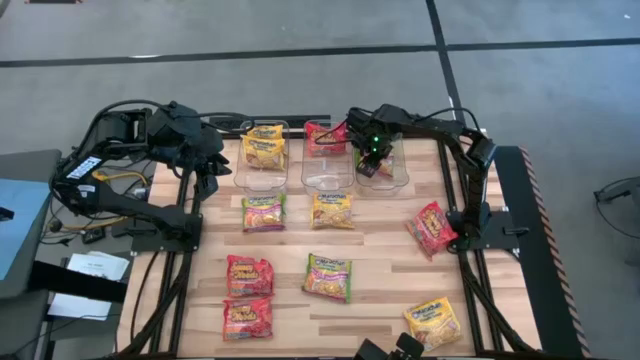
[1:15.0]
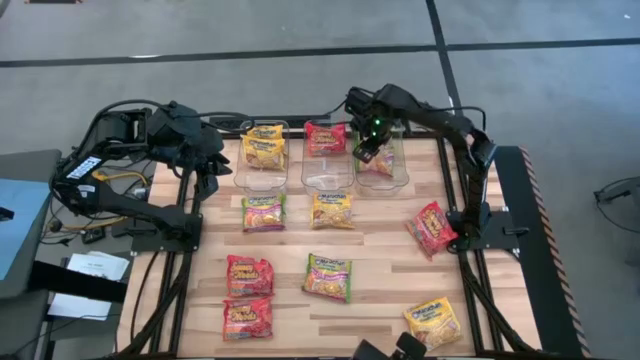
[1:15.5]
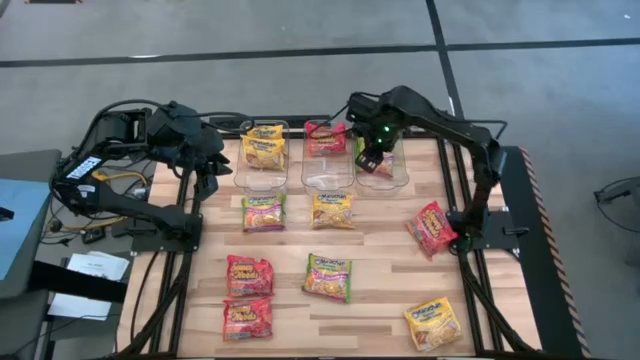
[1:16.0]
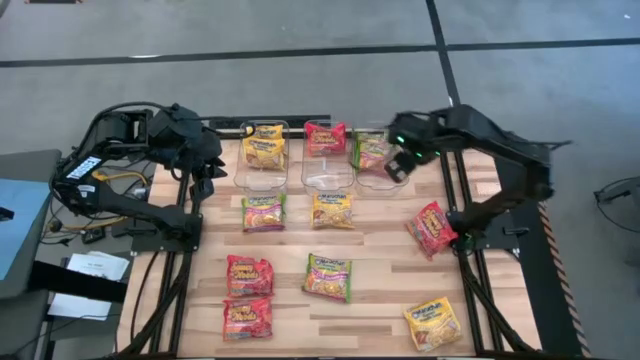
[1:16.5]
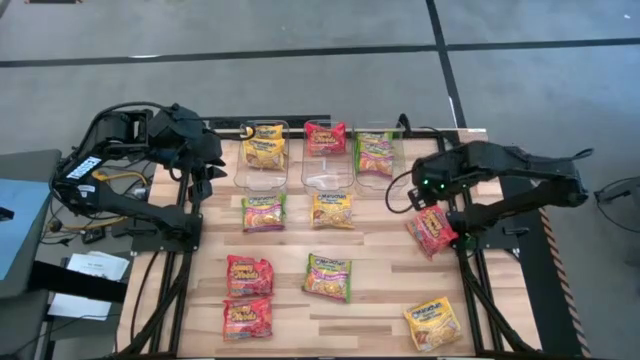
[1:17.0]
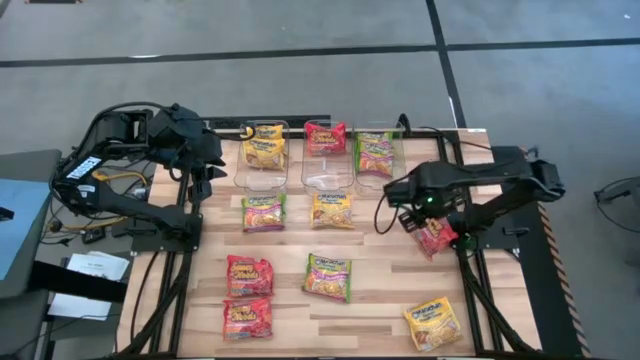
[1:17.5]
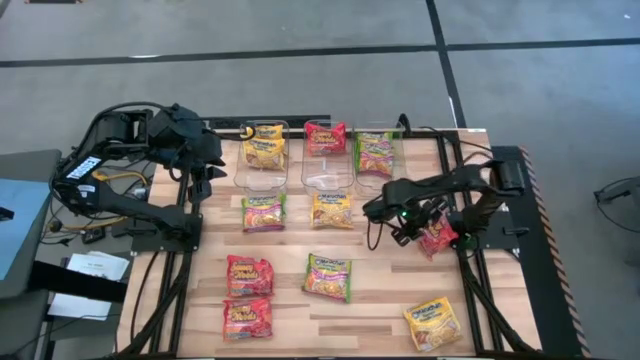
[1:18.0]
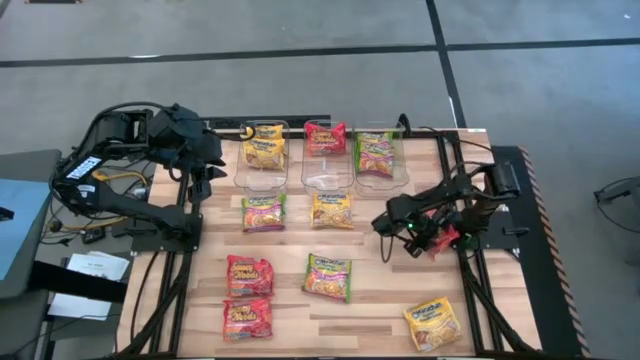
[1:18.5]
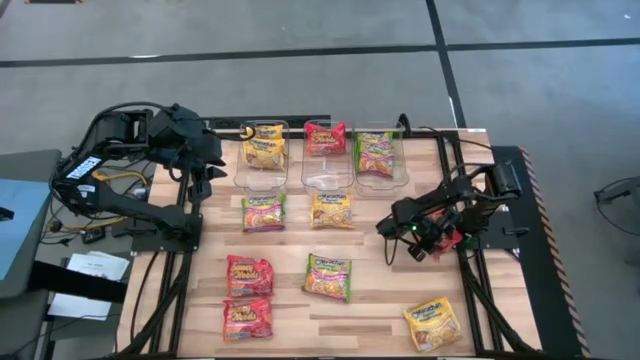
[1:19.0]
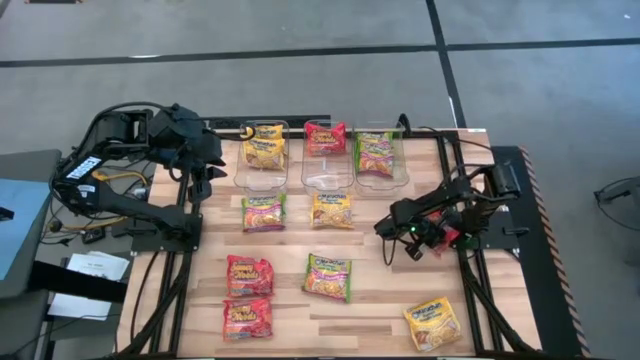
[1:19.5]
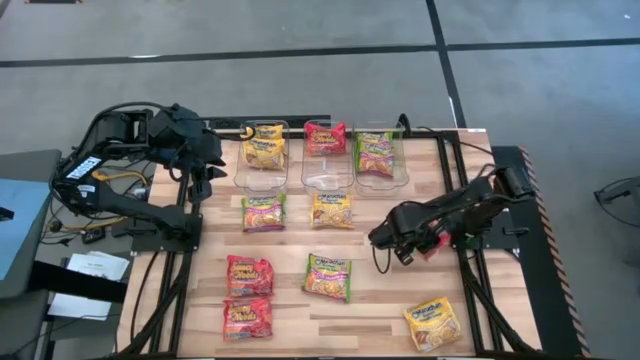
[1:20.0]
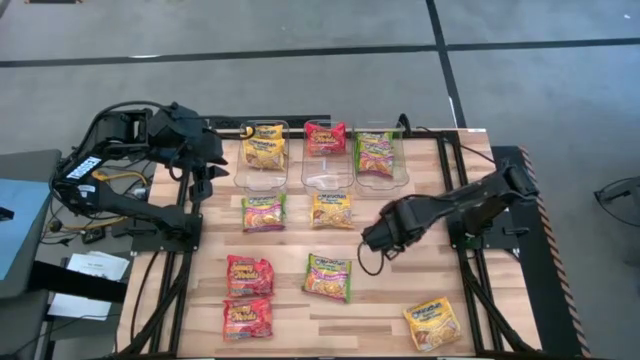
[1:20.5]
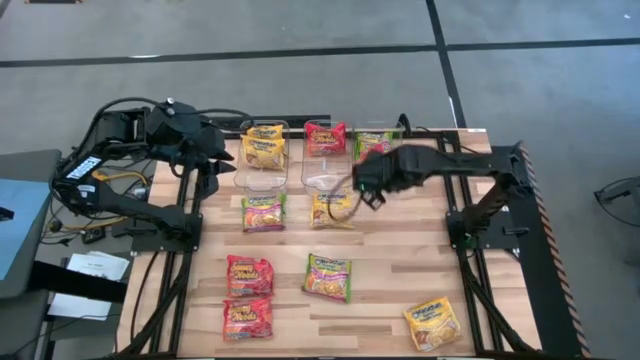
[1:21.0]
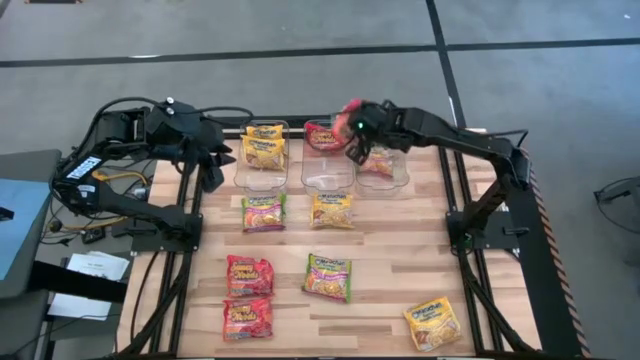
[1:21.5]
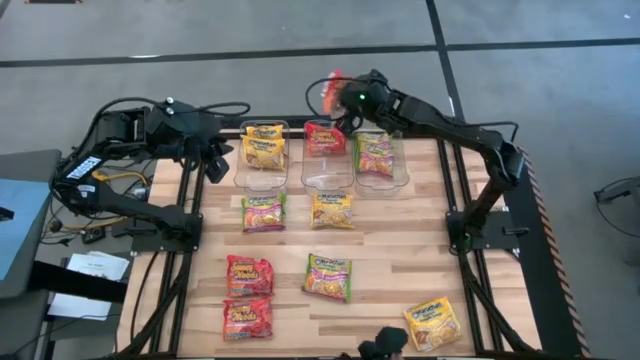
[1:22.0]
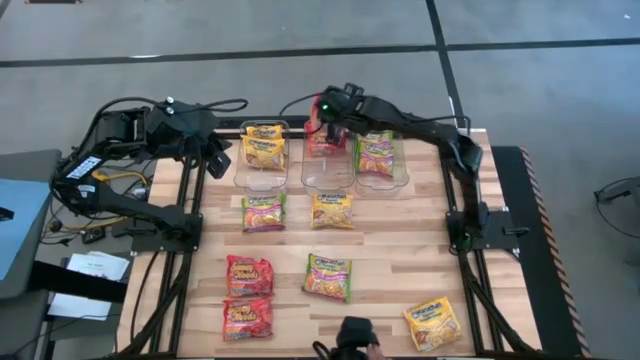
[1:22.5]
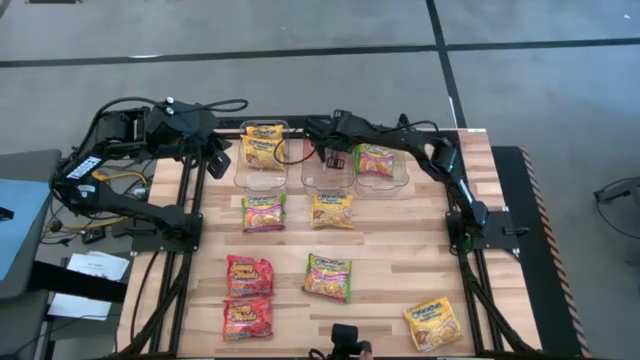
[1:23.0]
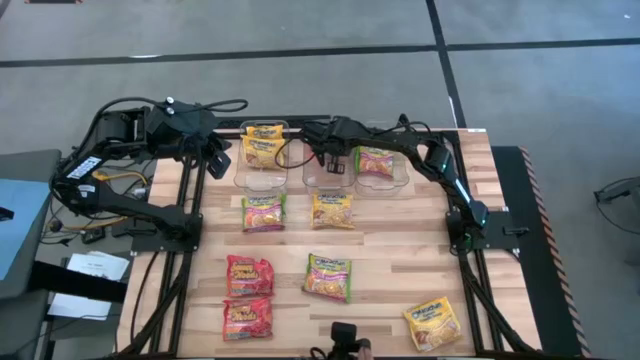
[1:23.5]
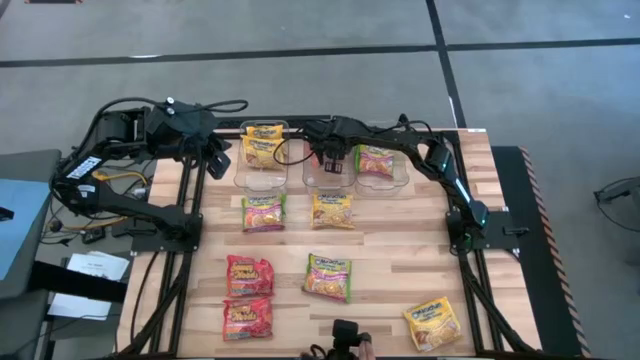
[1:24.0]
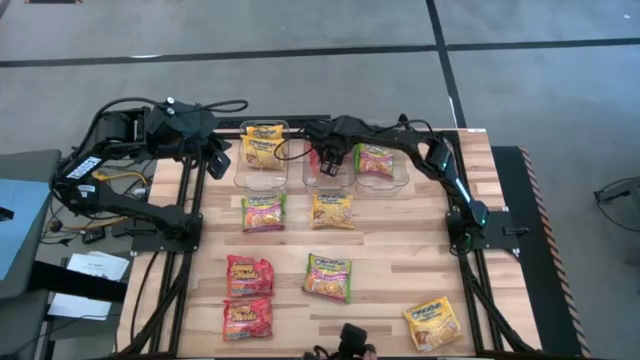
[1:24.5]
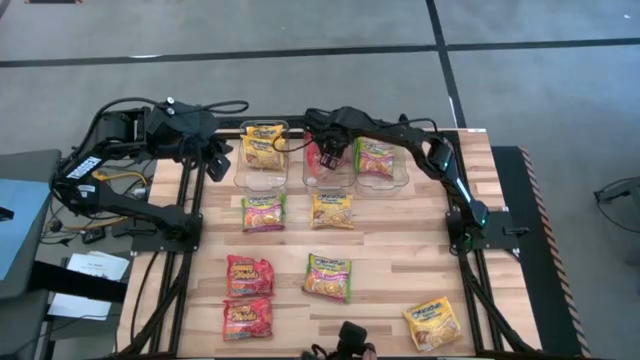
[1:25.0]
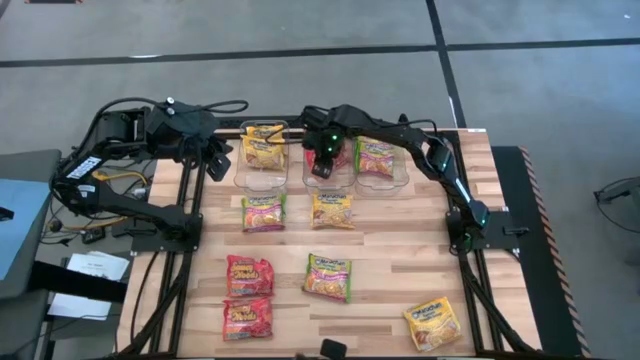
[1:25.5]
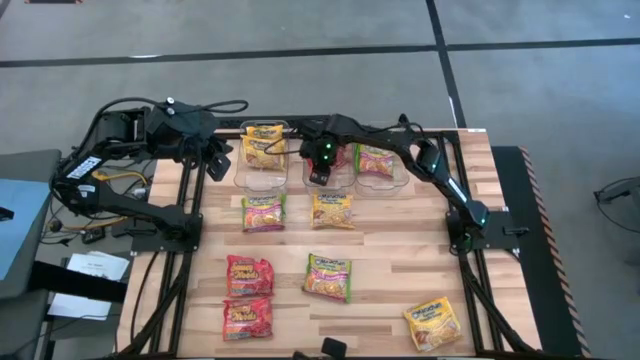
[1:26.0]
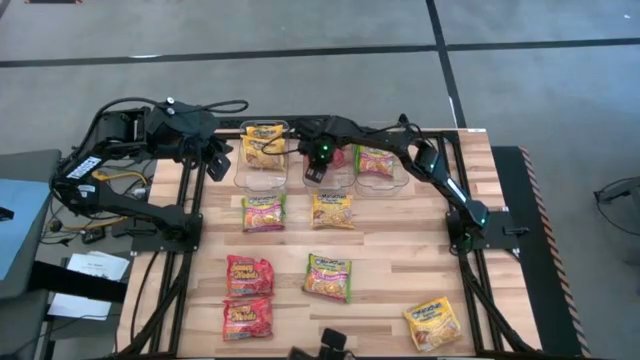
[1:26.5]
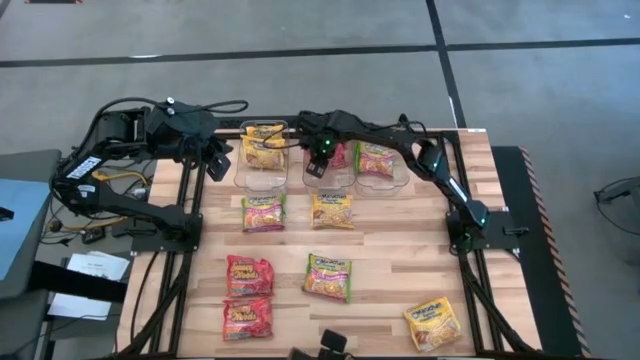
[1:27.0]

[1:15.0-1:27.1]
Task: Sort Maruchan noodles
Put the orange noodle pack into the middle transparent bin

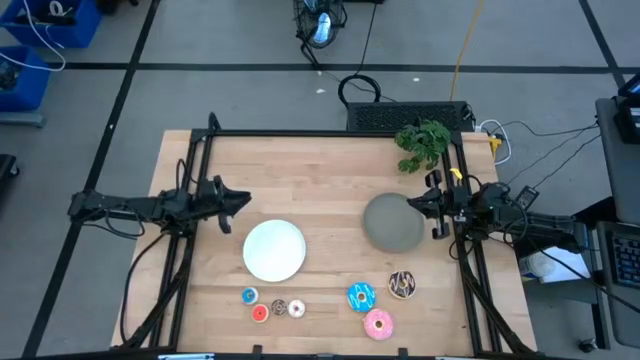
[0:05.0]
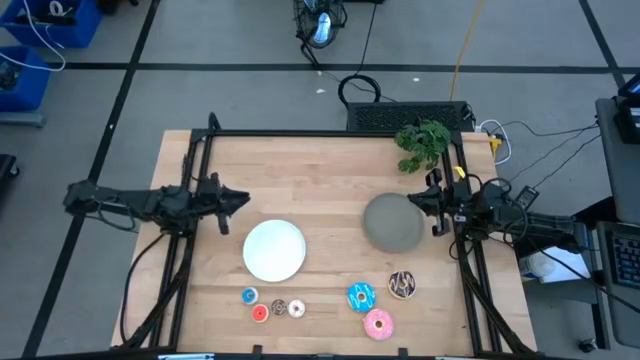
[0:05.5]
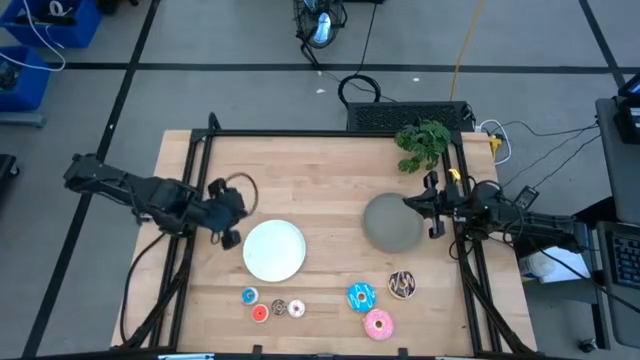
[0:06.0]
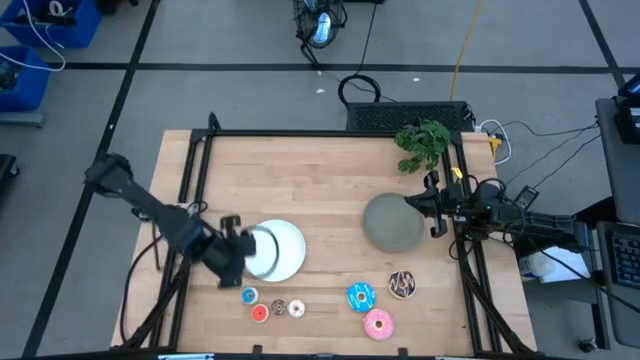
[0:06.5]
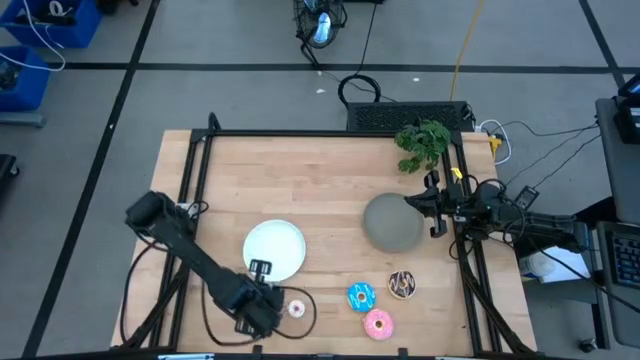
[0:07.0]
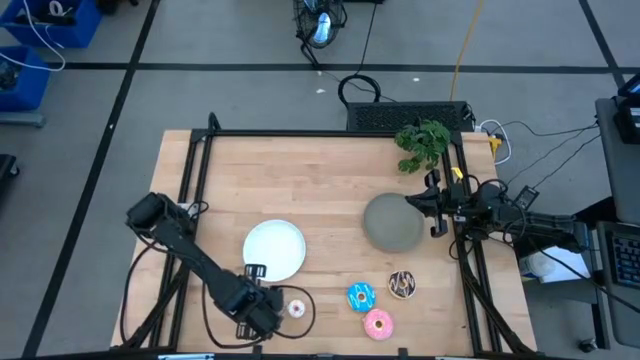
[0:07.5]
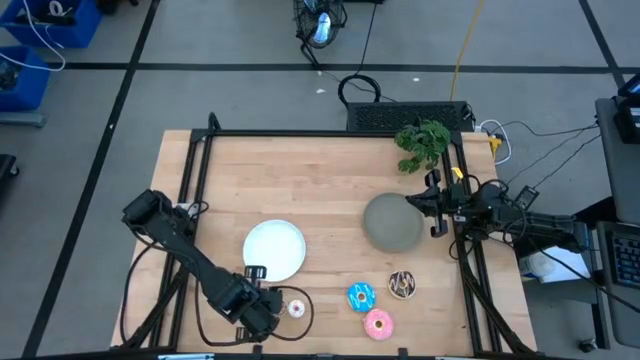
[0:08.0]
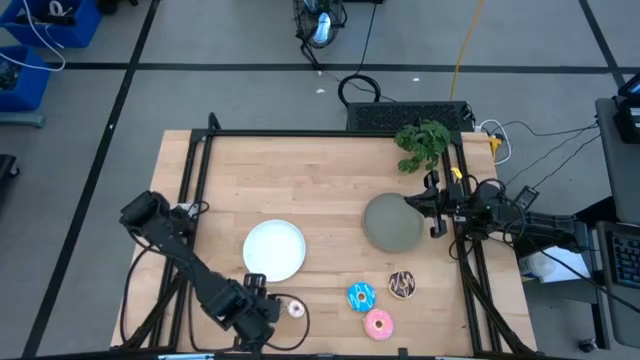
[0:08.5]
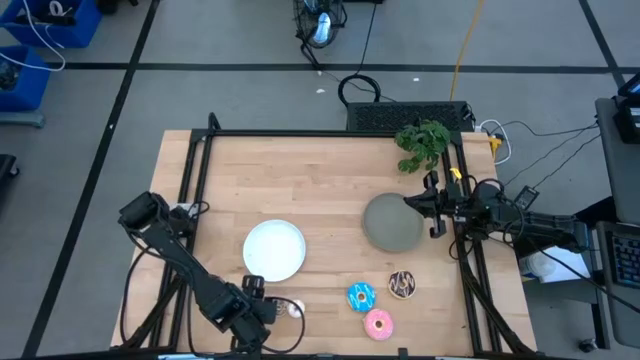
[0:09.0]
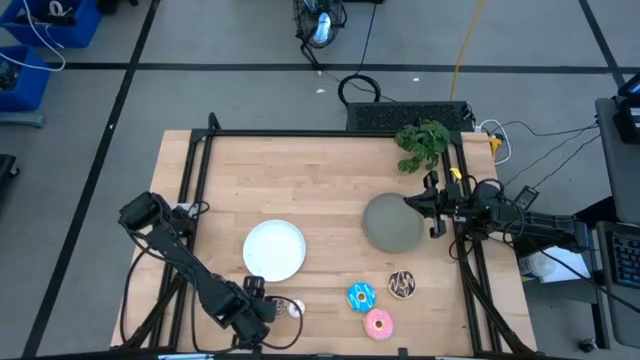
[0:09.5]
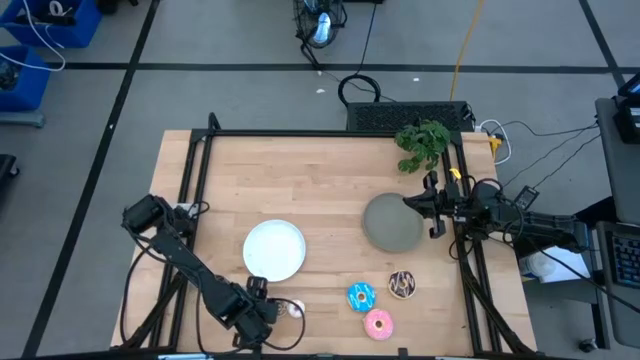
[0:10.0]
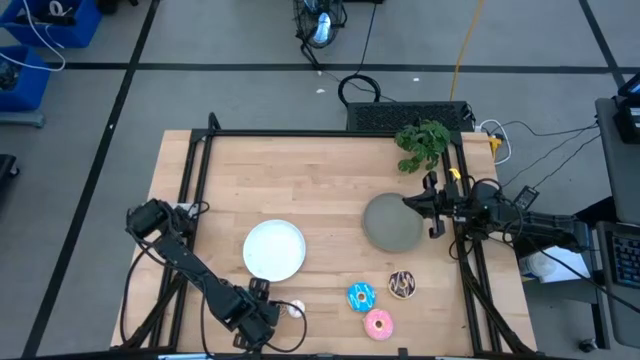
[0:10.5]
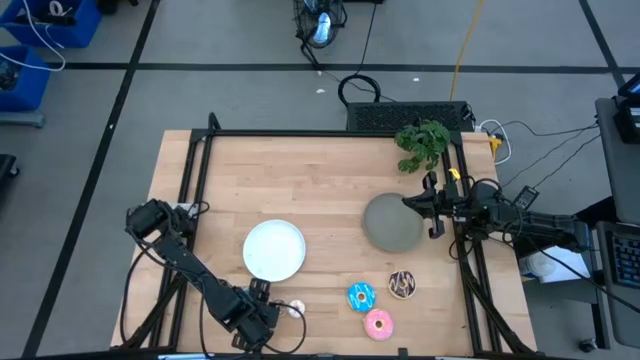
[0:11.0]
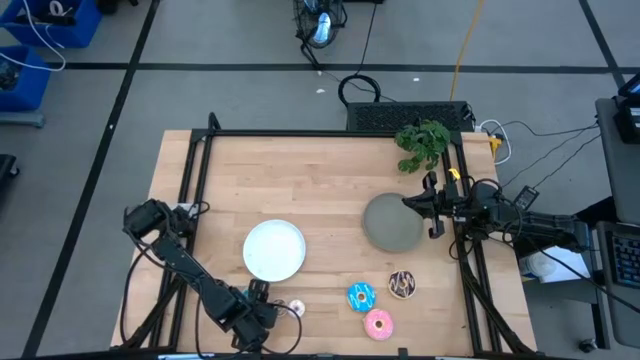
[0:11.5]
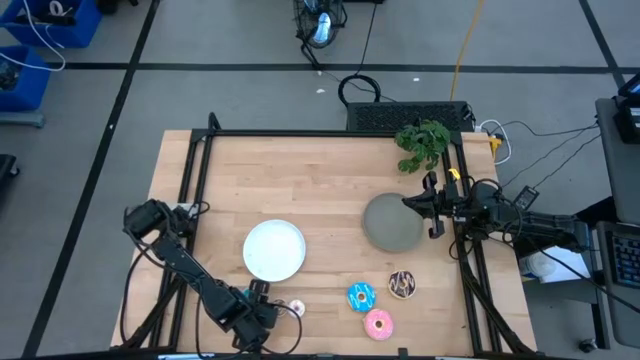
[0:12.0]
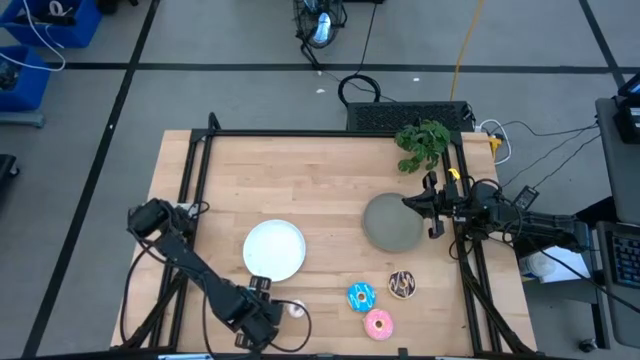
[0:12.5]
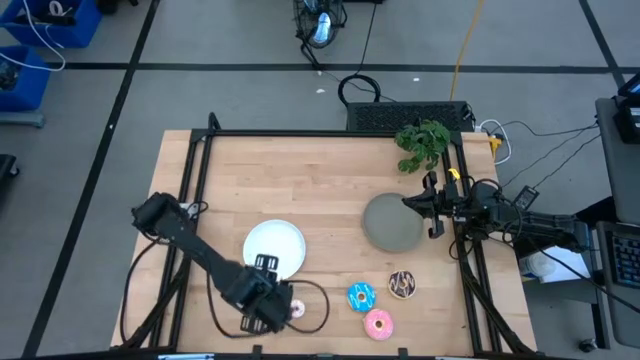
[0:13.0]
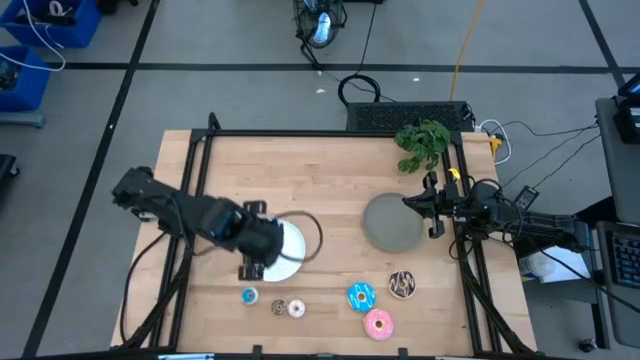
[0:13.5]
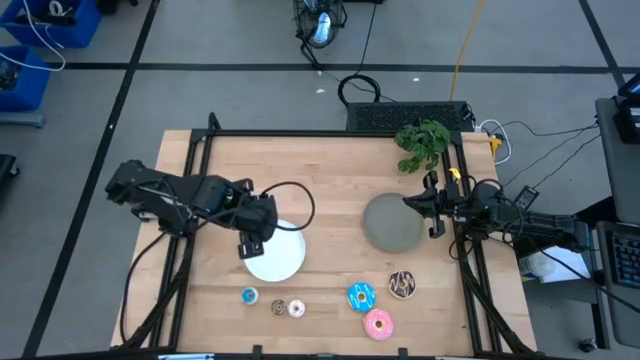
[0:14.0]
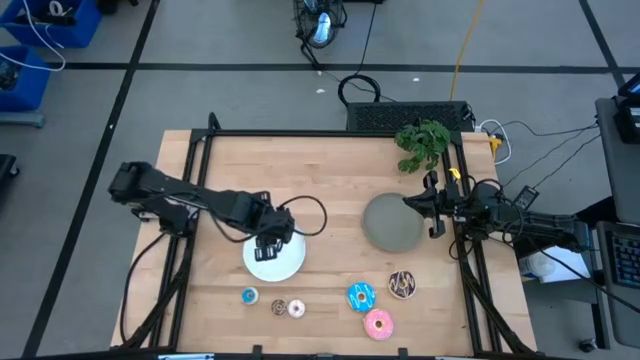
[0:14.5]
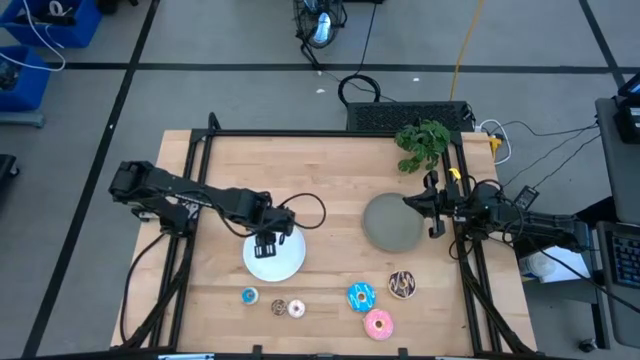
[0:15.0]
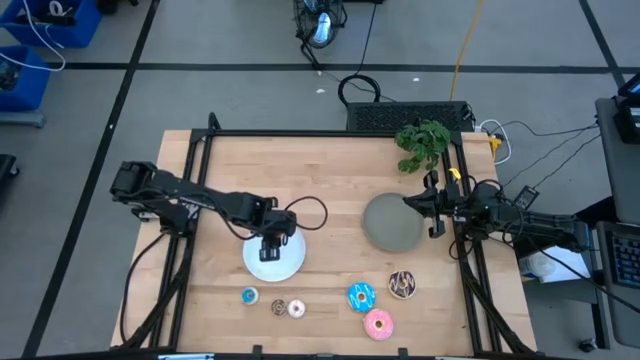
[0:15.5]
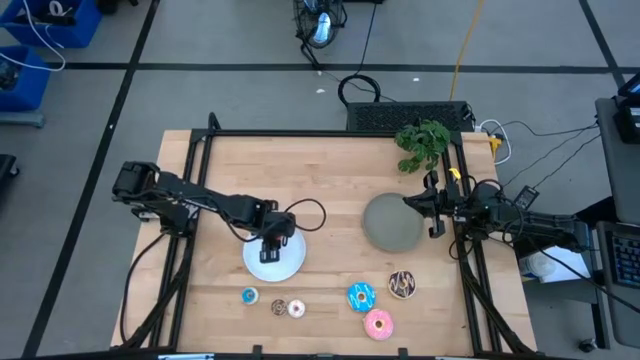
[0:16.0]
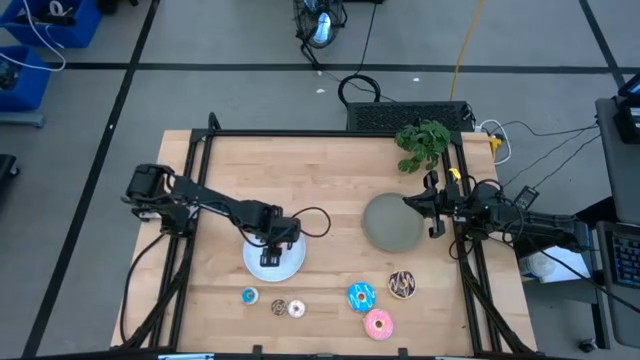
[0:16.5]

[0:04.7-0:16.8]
Task: Pick & Place donuts
Put the small orange donut on the white plate
